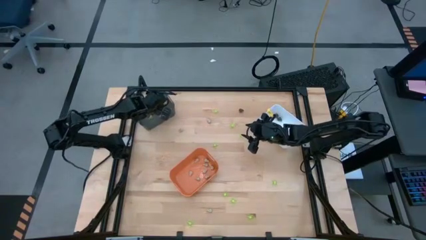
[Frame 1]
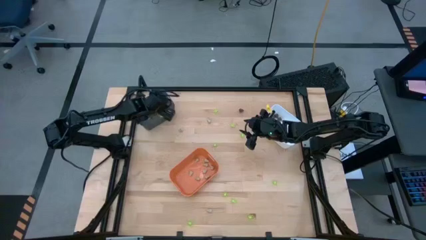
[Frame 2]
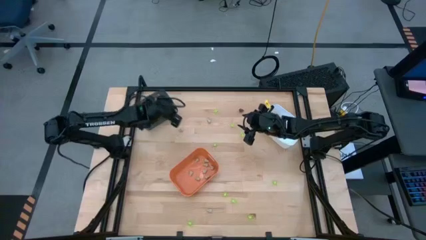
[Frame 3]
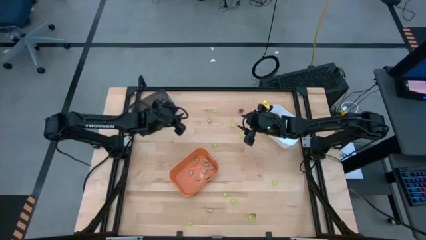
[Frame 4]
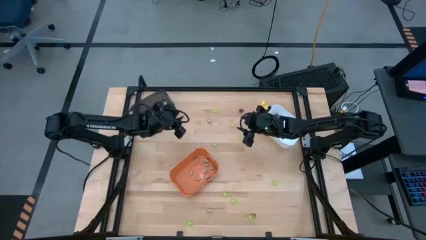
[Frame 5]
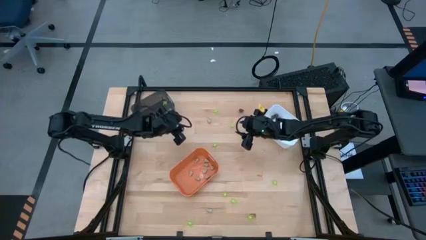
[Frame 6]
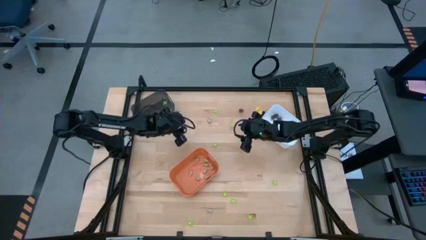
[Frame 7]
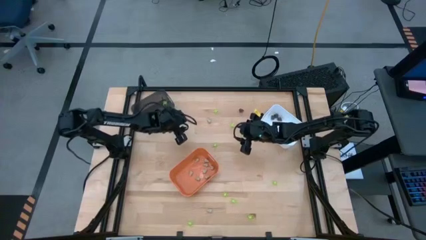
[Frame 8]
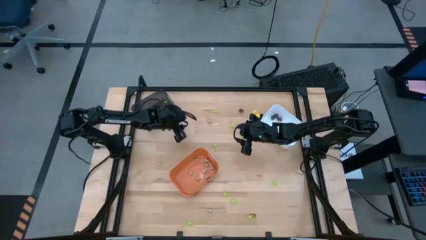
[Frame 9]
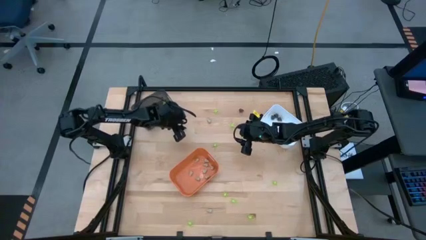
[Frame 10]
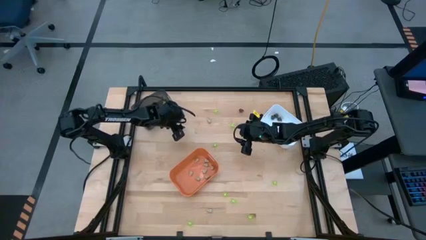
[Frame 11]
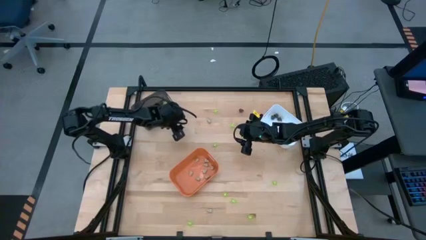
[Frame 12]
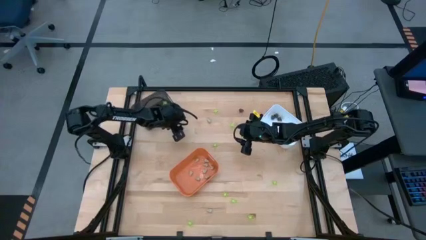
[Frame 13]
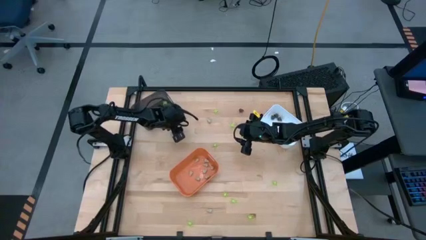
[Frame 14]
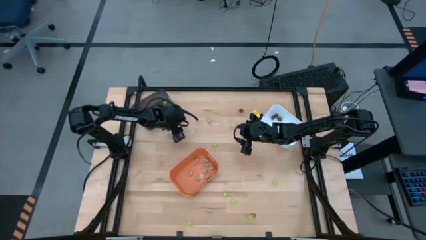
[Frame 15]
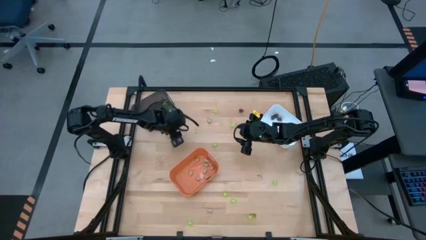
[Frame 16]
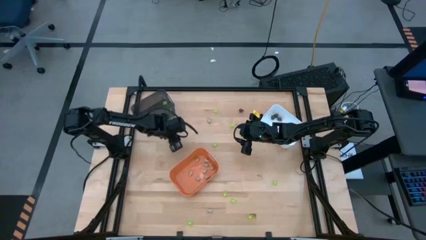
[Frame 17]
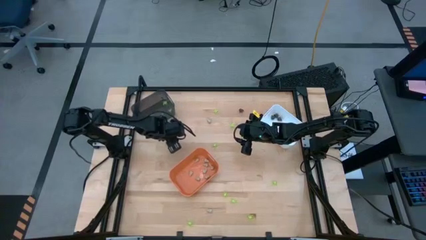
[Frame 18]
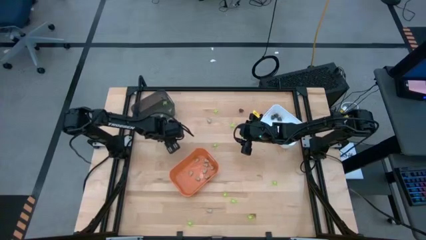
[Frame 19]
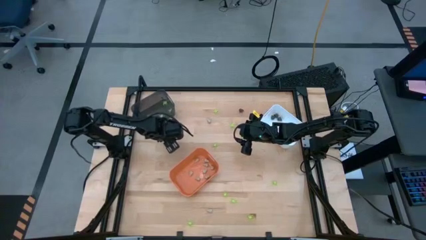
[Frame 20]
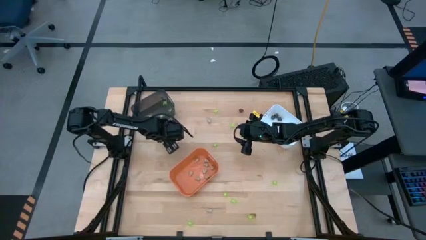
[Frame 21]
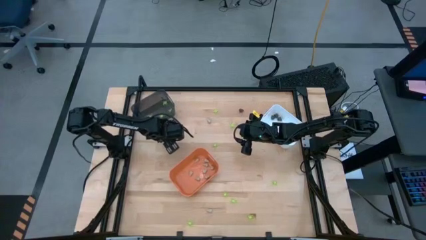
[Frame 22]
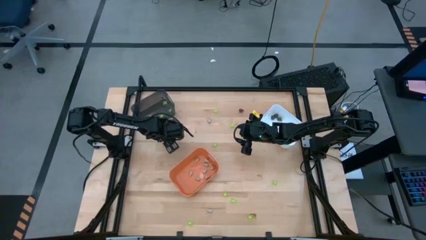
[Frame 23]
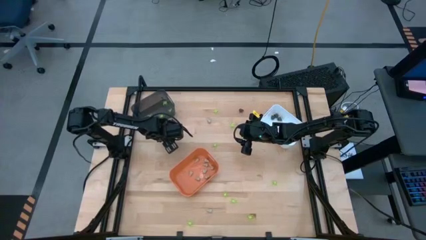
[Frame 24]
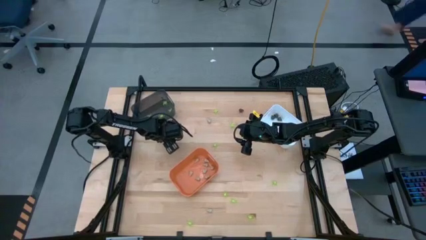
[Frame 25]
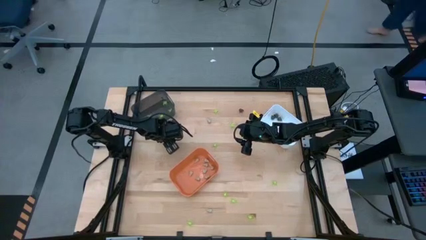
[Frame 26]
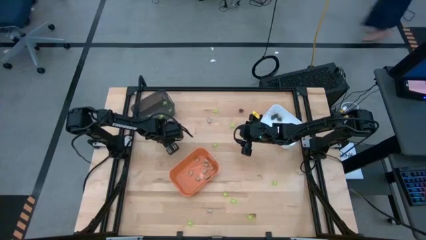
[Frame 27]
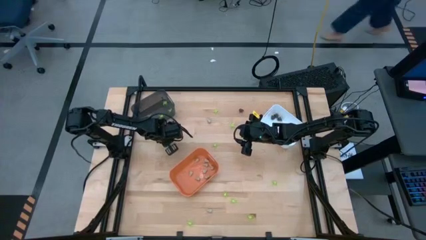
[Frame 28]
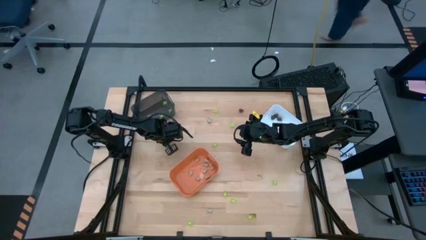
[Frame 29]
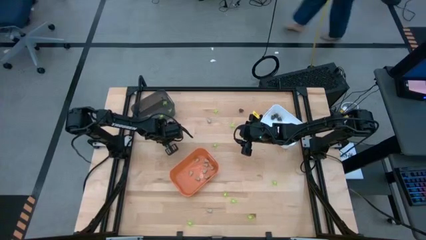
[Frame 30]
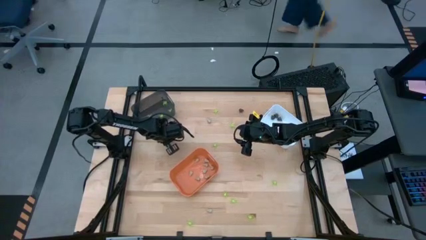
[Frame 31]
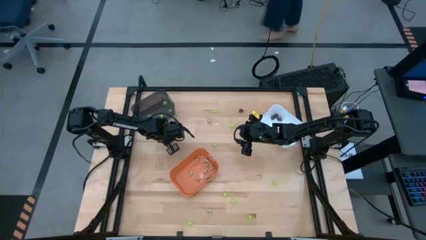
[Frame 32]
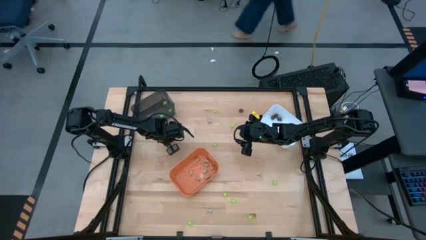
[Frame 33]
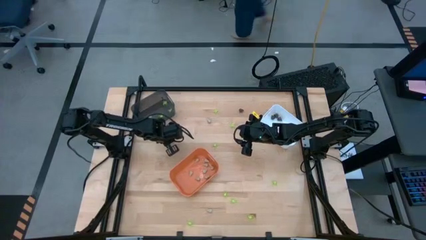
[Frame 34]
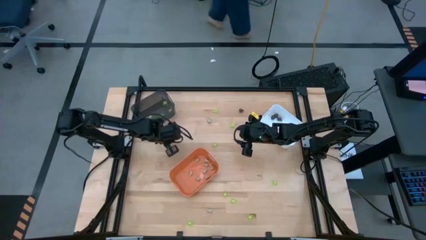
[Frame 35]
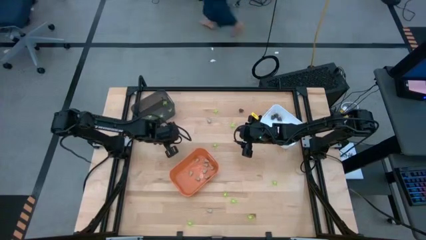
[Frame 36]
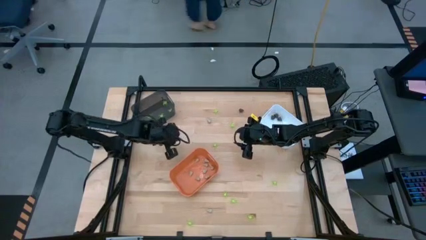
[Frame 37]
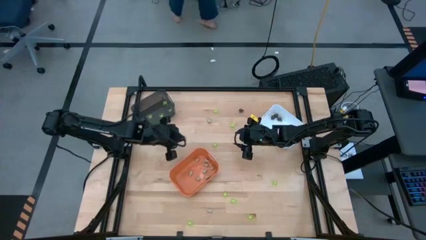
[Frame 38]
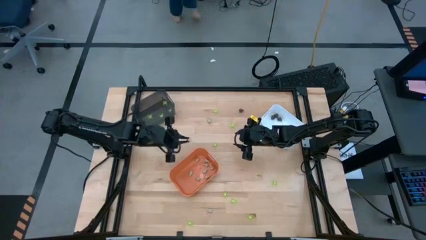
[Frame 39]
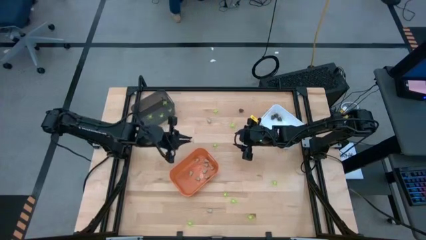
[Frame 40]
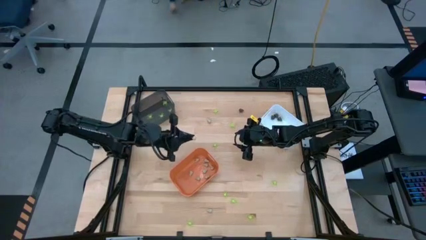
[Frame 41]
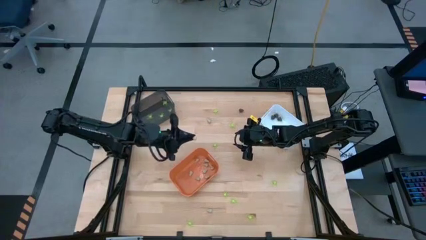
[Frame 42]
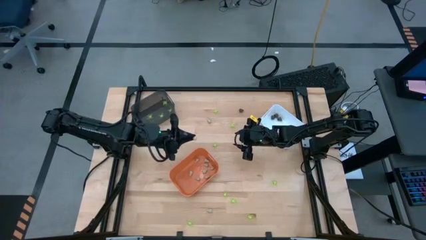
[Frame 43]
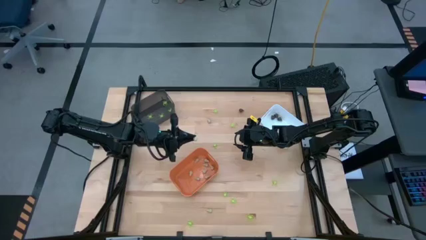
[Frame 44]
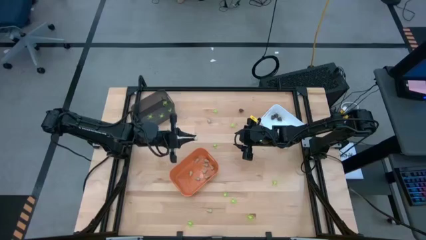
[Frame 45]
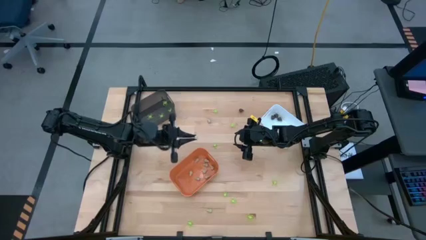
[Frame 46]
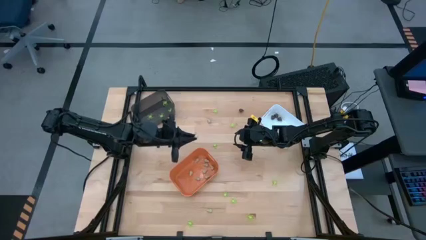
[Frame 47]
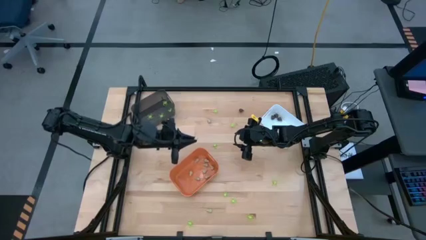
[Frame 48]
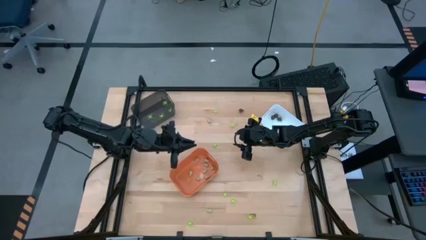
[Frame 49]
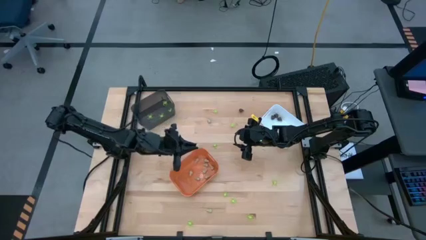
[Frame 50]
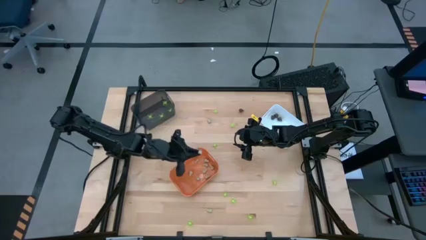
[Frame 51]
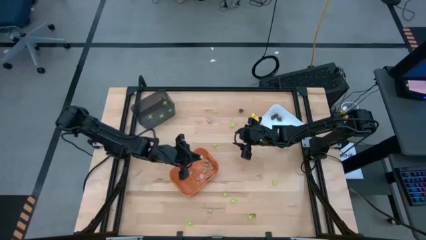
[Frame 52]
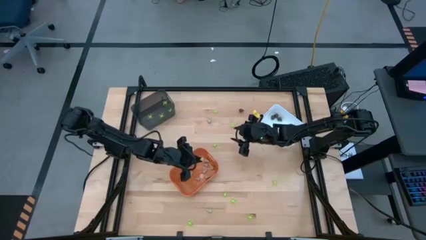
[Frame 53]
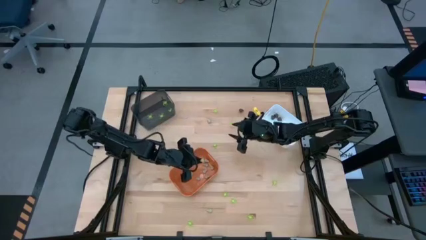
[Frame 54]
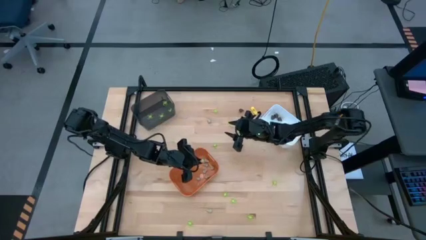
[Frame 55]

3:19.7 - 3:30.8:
Task: Sort Halloween decoration
Put the small white skull toy into the orange bin

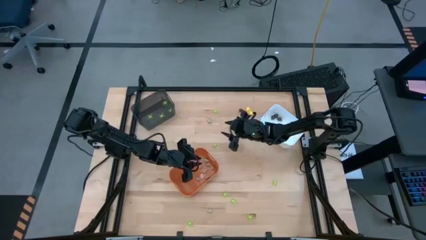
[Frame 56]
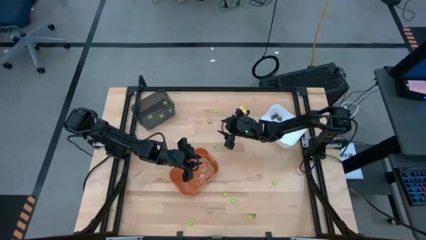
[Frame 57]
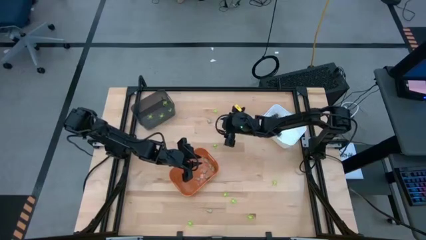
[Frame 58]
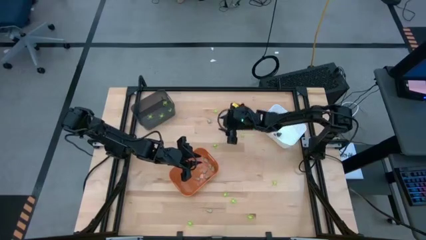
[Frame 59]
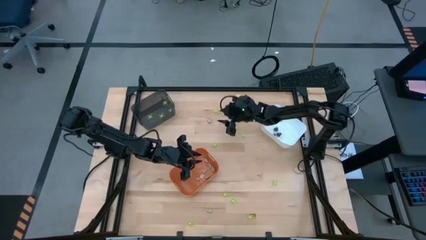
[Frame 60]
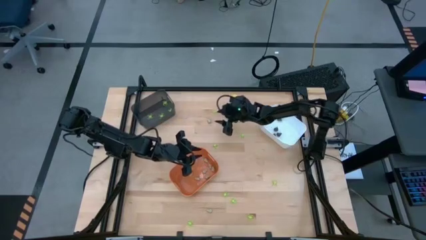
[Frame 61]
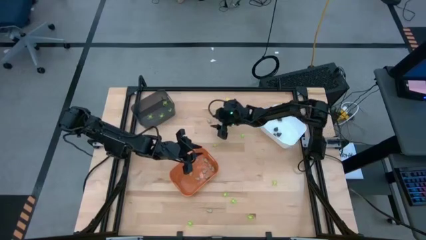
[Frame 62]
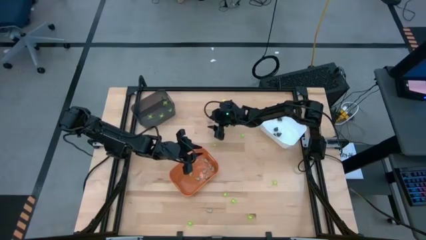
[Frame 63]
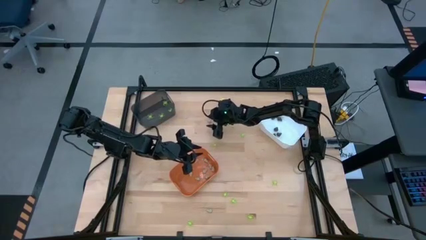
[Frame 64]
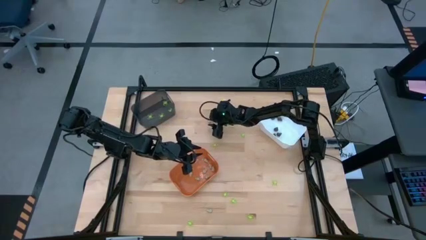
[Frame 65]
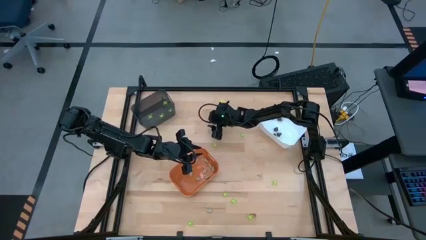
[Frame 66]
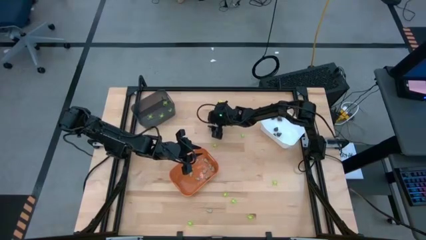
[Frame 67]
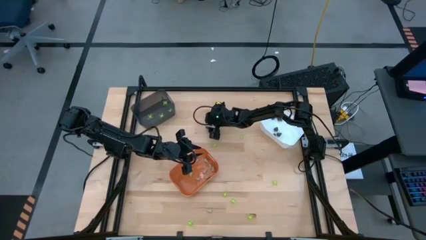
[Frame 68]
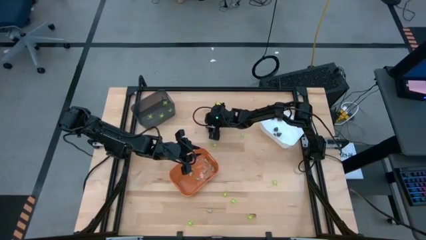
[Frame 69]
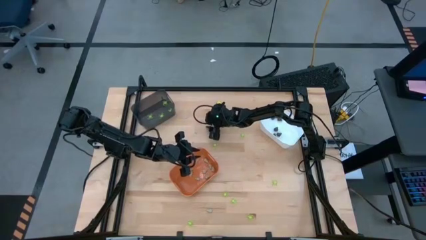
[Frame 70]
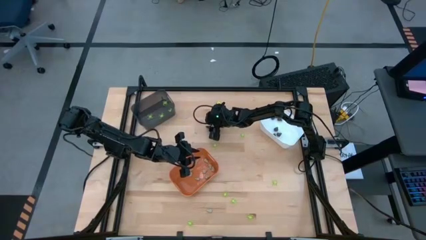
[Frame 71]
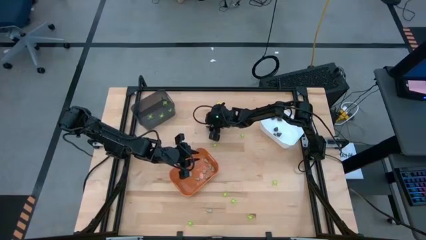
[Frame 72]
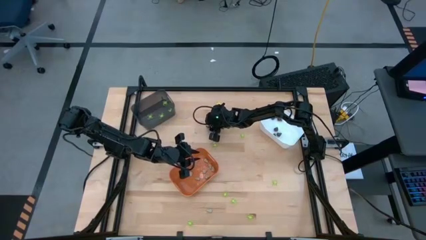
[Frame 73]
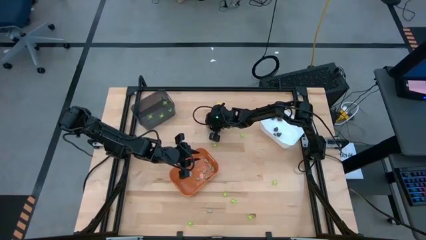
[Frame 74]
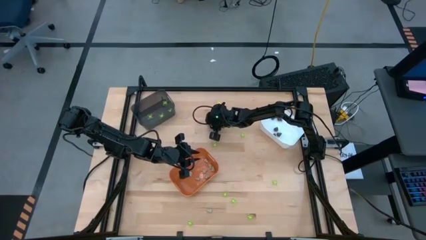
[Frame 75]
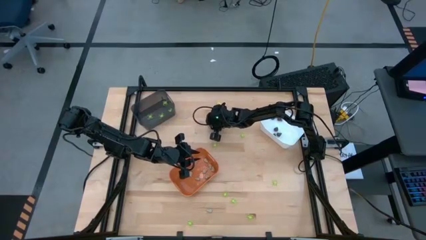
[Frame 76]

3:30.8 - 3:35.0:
Put the small white skull toy into the orange bin
